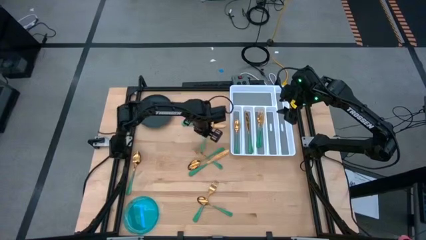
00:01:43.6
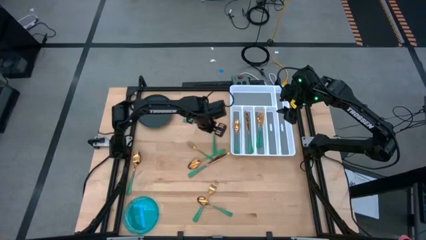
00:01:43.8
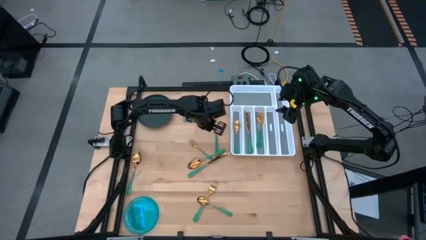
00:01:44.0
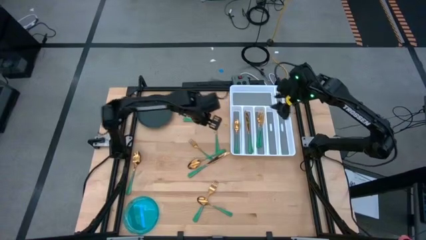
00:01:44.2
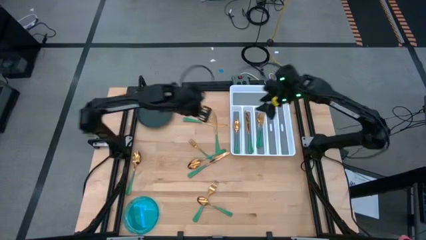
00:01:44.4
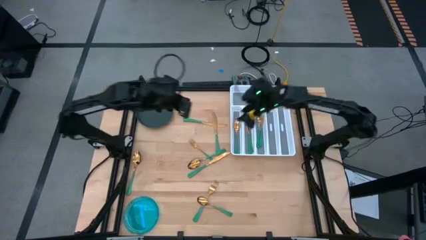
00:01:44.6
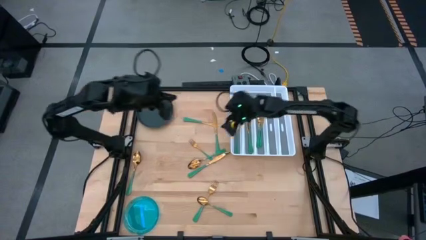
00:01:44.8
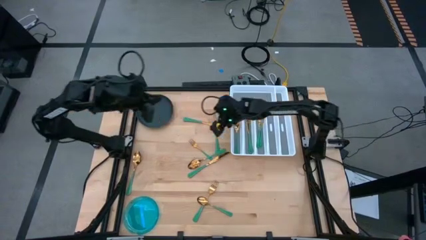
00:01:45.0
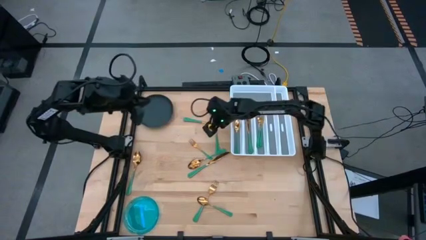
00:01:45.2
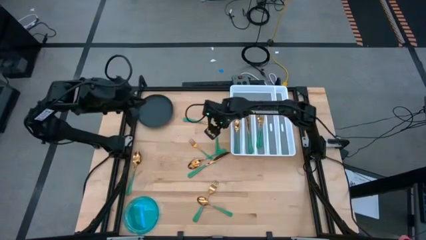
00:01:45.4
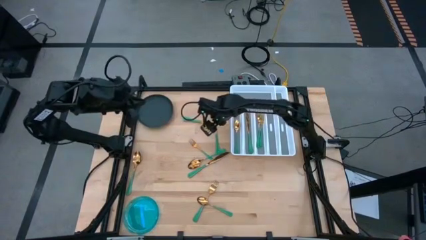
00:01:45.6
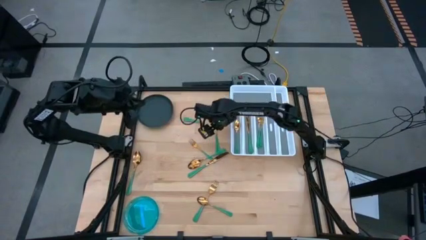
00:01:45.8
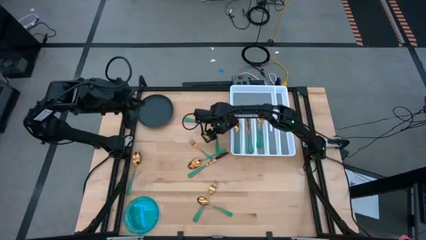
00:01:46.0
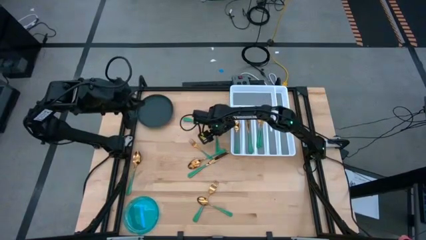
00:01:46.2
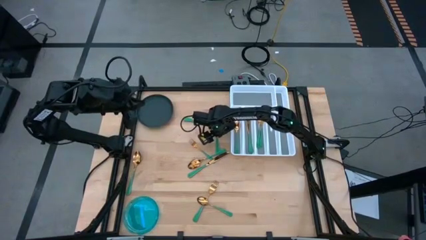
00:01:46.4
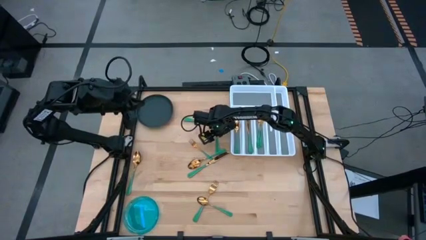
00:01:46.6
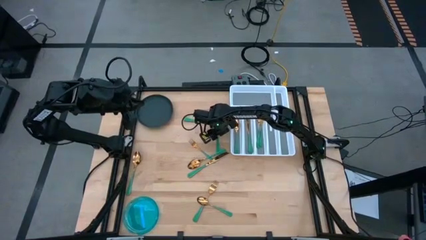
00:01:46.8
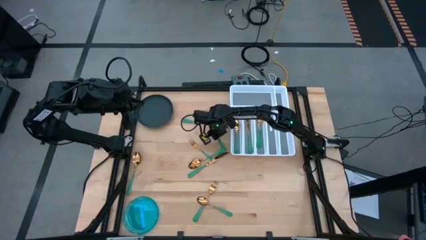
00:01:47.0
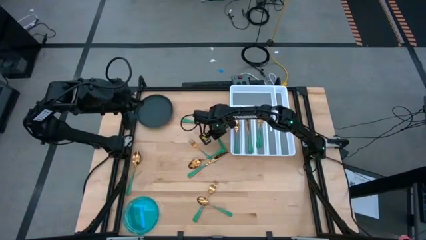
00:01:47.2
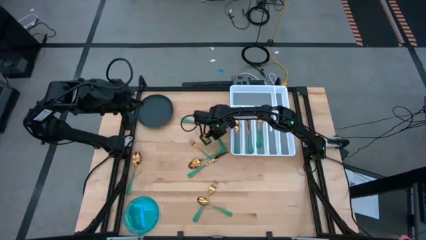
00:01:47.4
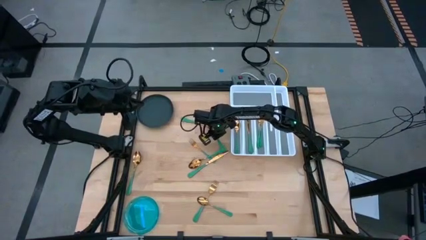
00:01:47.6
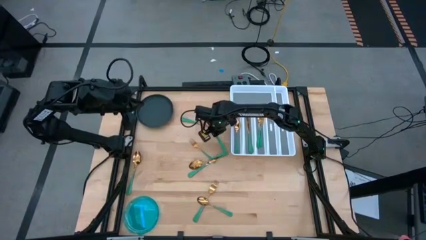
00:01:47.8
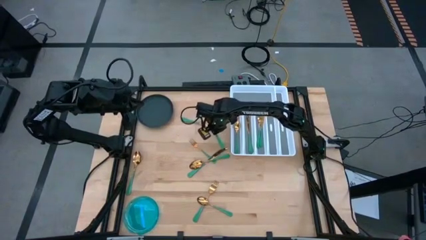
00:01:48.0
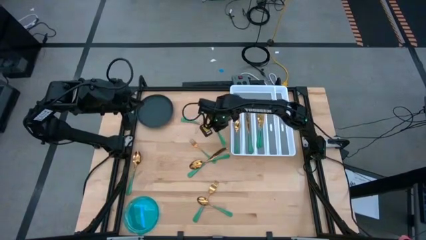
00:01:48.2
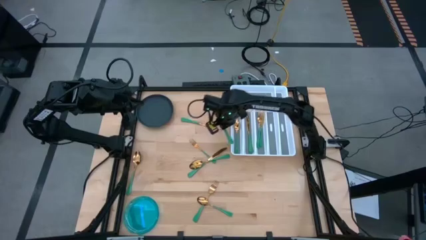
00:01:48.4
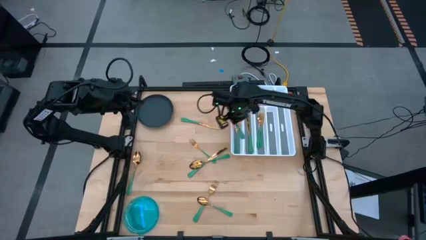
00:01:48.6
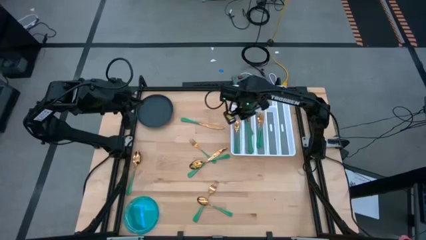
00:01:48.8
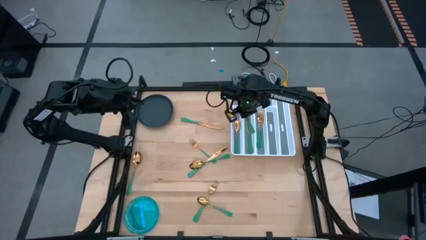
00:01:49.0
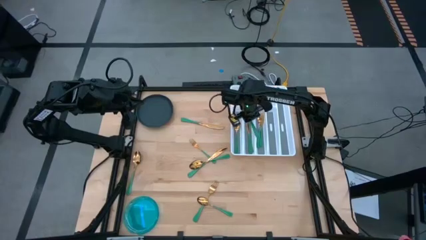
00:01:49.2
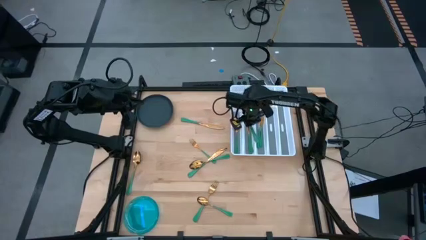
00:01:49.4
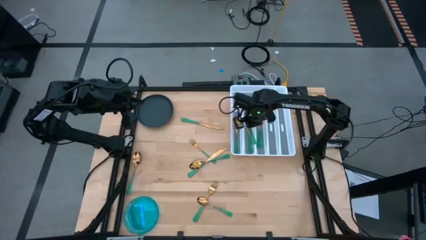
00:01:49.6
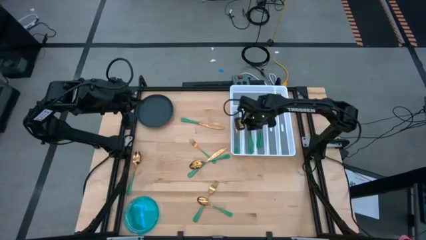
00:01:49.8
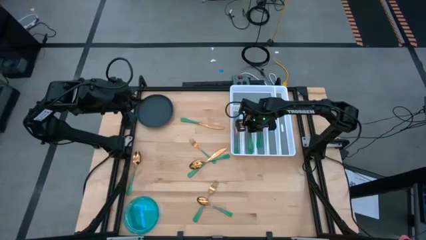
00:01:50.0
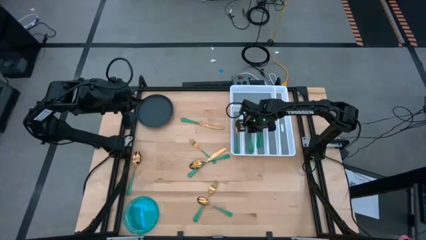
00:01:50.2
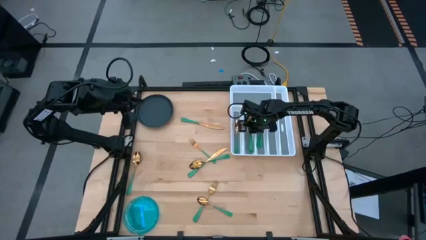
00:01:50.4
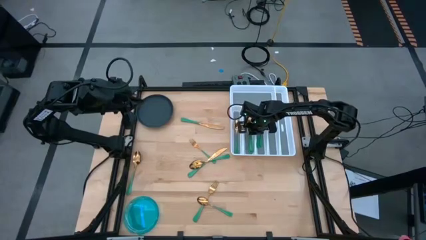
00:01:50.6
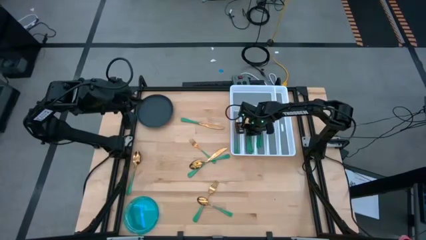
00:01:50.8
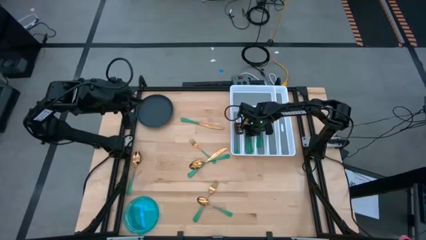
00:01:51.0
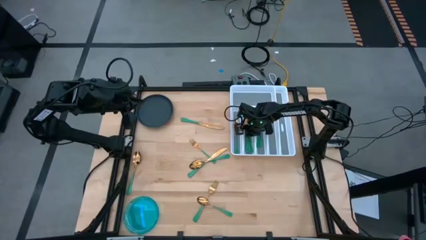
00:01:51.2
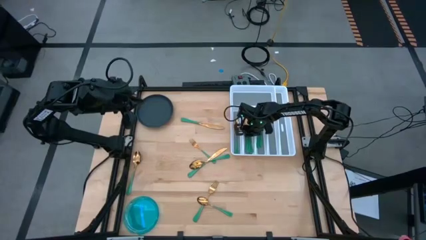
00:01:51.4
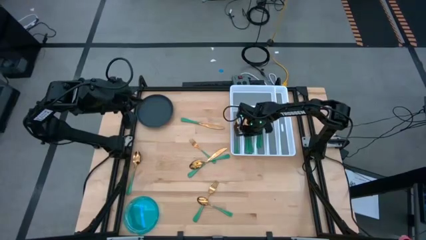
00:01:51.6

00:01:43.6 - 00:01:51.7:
Task: Sort silverware
Put the green knife on the silverware organizer

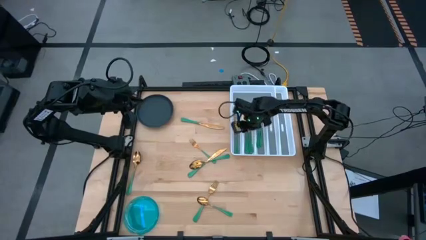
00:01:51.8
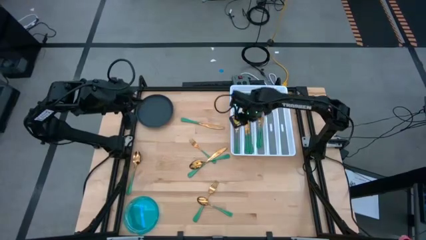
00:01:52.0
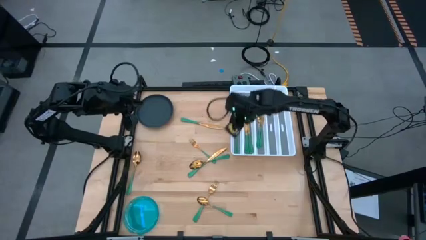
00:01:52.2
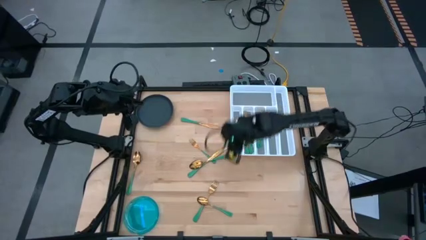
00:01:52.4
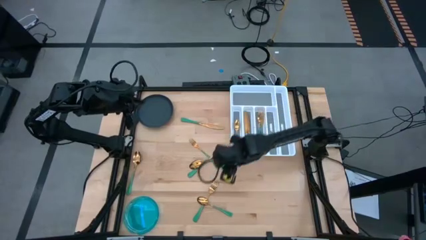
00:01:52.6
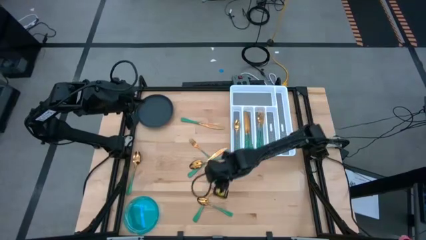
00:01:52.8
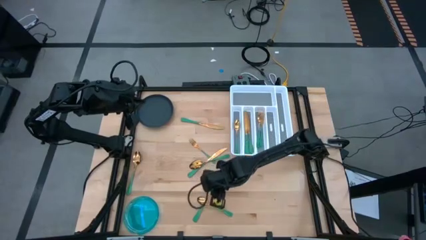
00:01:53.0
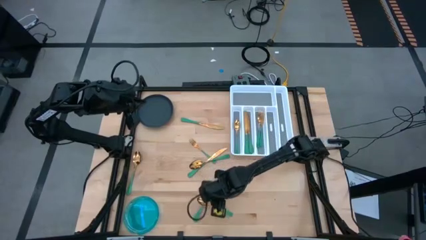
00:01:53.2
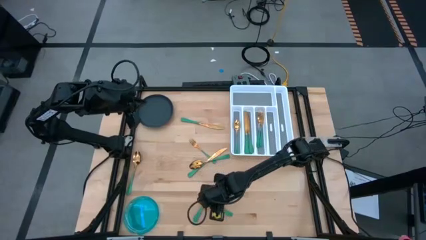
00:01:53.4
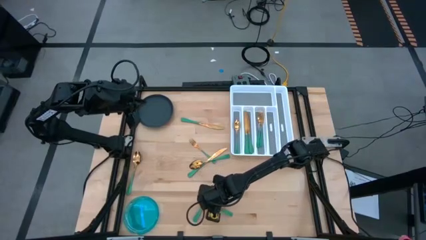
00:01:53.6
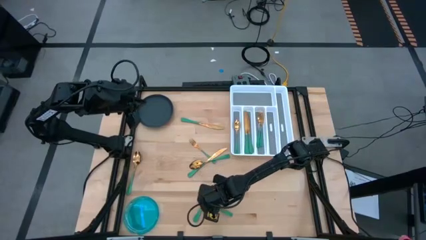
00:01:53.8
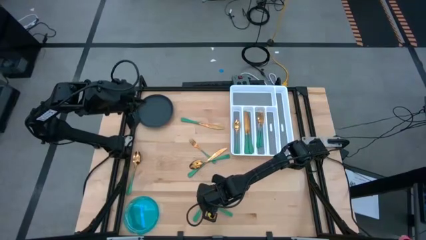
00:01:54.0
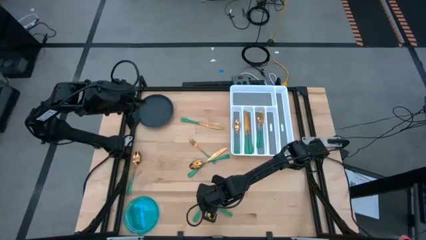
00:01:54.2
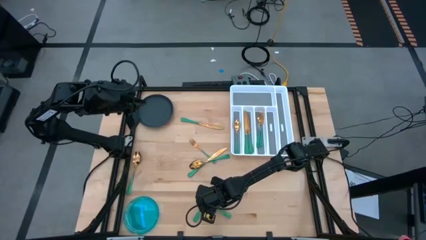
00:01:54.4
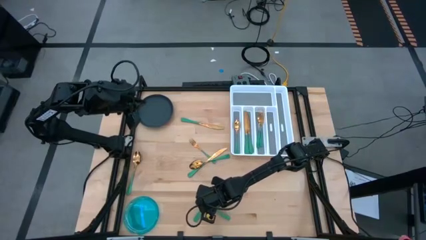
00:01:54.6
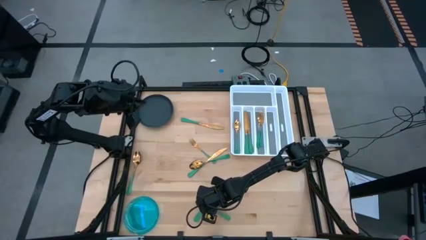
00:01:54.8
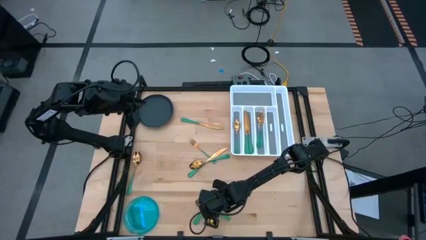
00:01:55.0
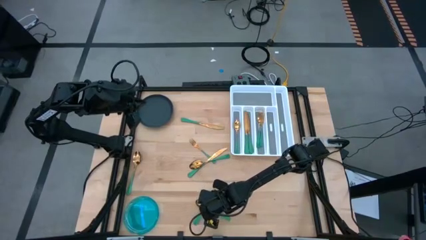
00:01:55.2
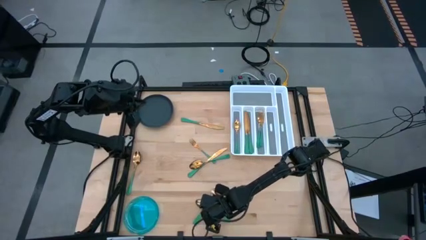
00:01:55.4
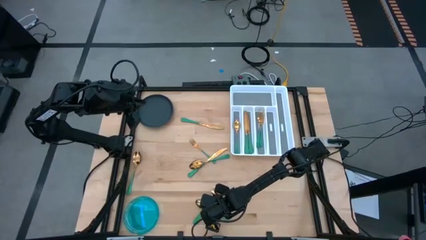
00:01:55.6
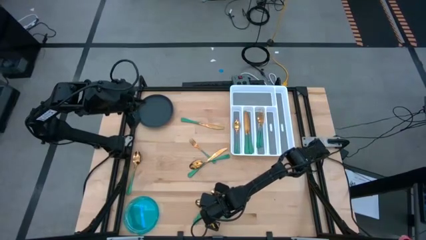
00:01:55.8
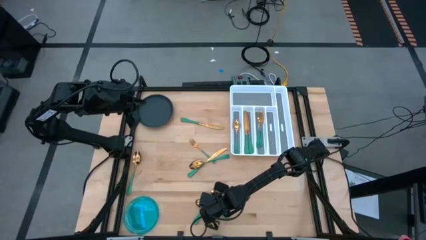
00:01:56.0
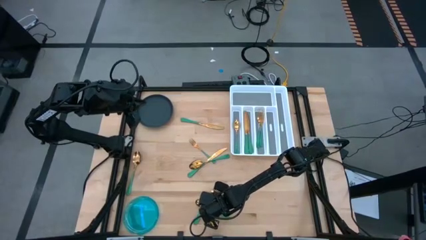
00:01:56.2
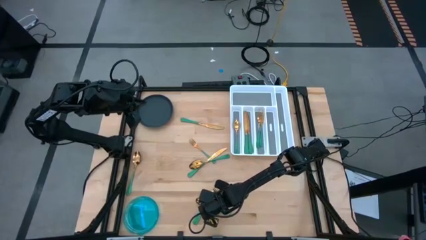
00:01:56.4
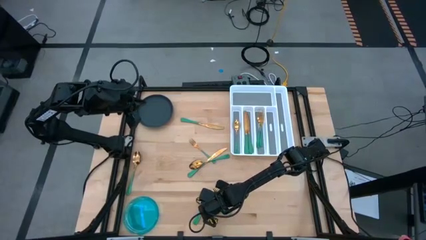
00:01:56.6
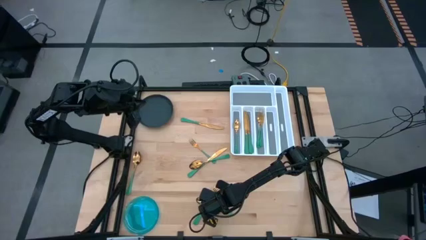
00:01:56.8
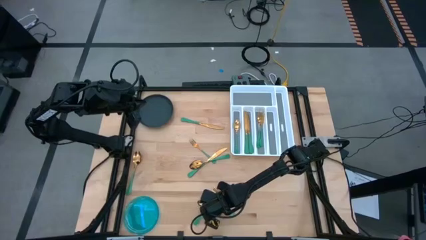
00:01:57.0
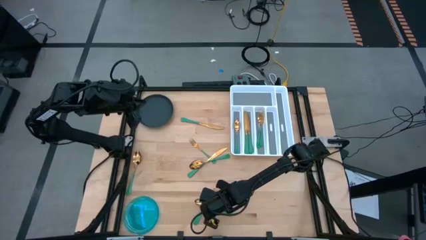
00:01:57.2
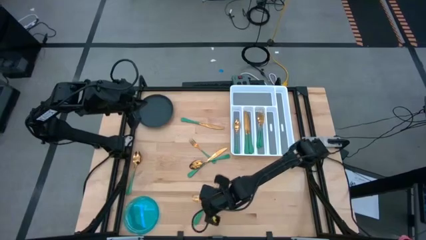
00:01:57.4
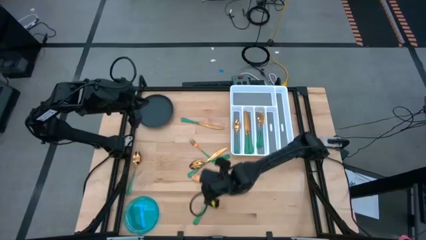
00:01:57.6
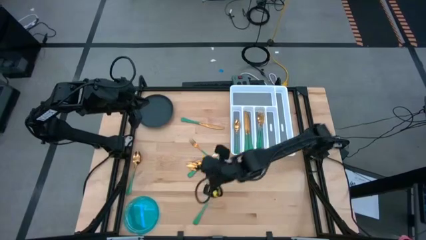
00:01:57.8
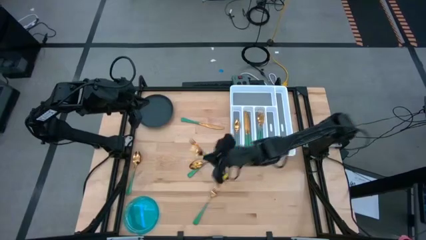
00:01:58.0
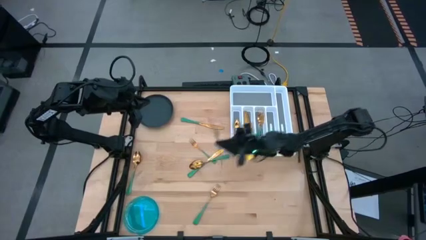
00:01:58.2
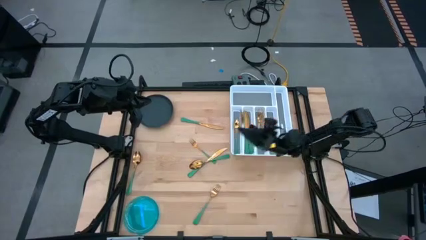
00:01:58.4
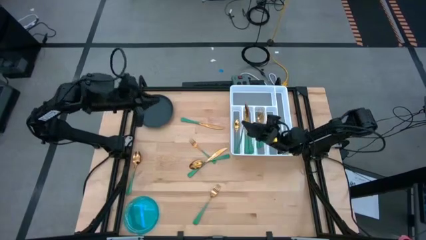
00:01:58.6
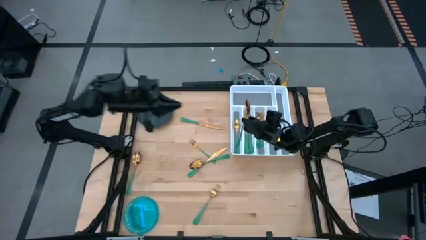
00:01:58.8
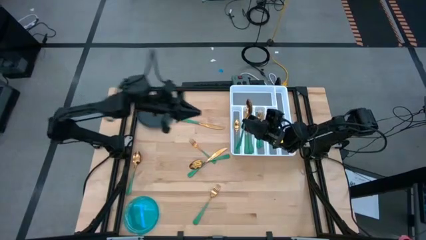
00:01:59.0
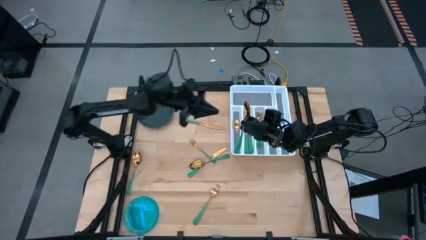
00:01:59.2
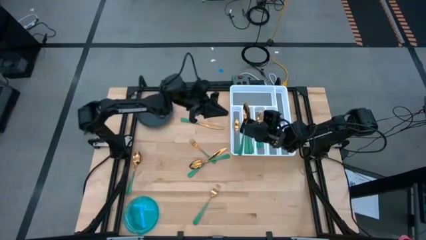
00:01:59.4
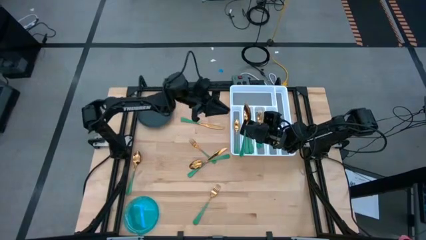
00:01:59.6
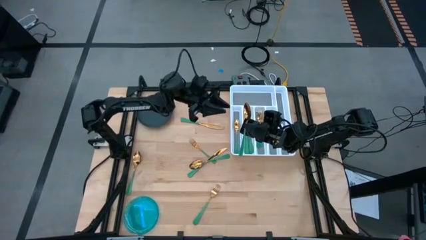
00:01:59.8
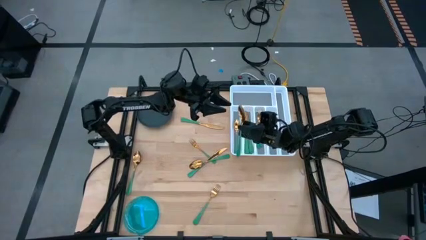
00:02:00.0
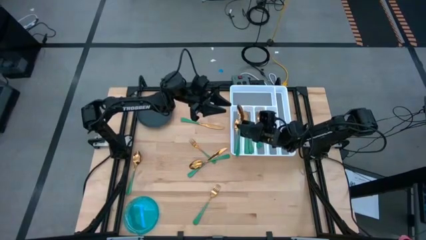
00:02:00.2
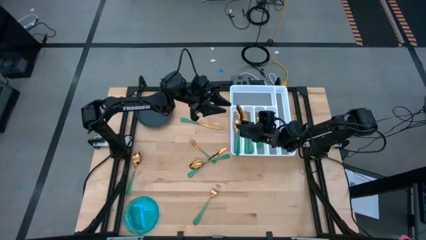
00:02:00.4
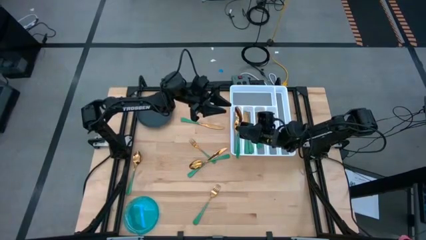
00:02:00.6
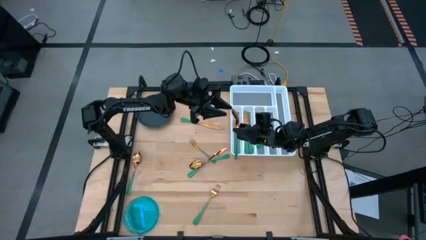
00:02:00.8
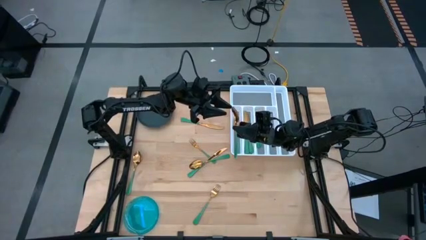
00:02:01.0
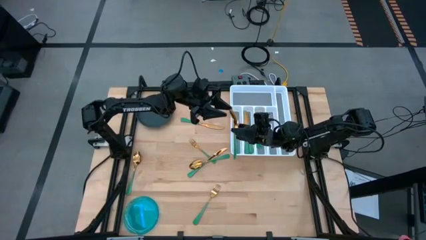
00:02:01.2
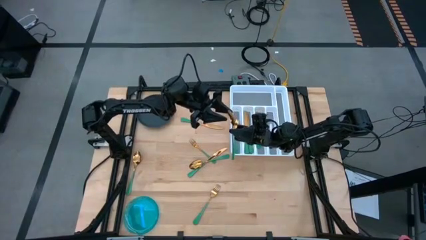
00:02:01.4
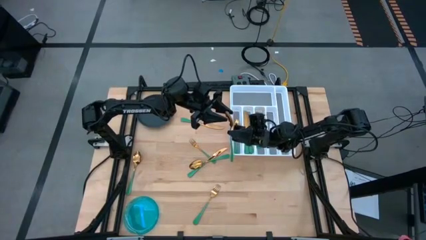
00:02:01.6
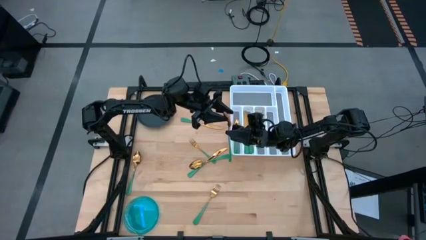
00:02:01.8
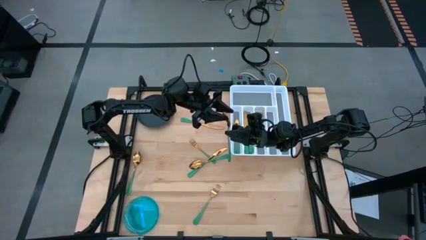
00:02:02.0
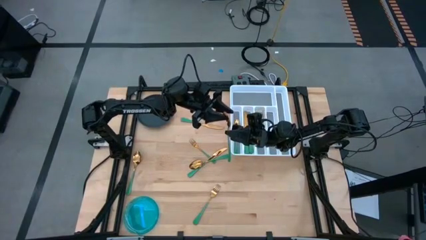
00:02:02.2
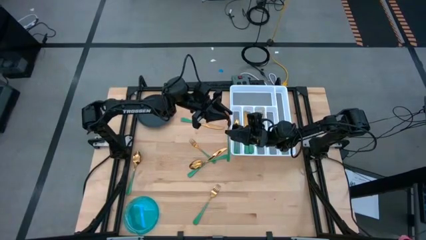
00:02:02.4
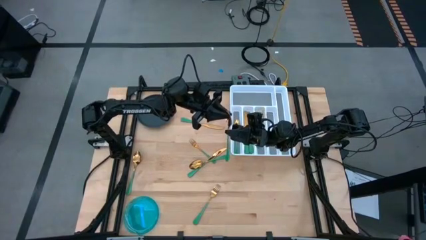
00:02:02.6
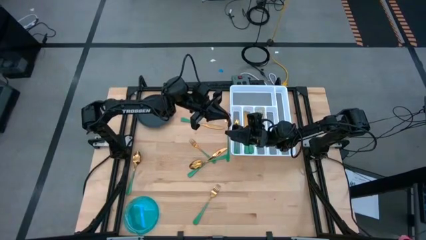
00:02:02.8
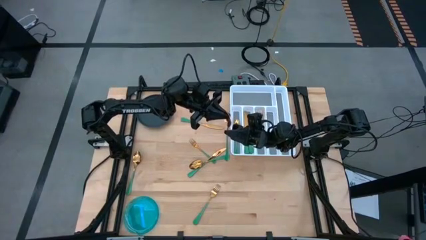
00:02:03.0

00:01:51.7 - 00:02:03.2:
Put the green spoon on the silverware organizer
